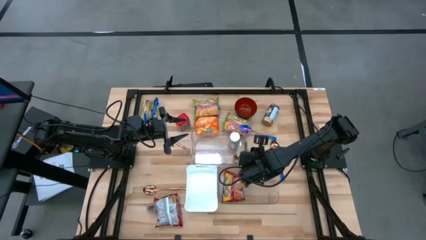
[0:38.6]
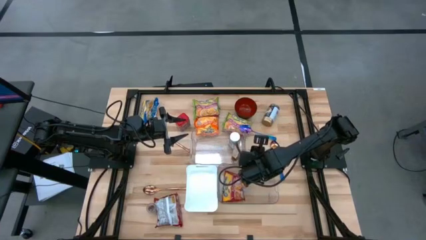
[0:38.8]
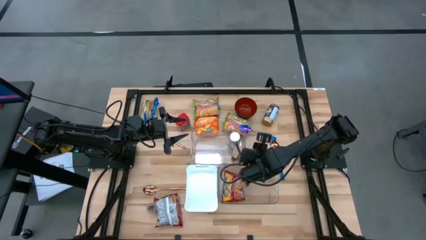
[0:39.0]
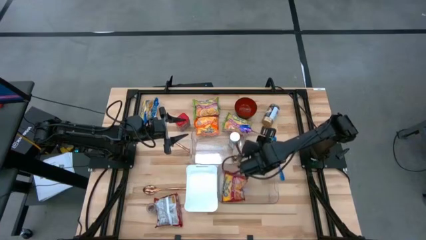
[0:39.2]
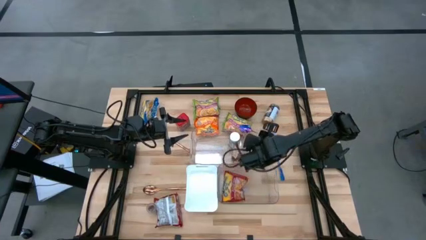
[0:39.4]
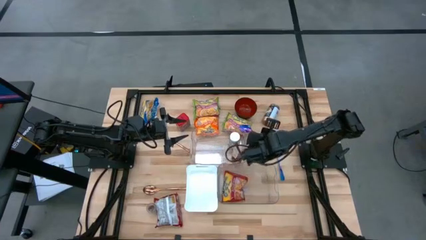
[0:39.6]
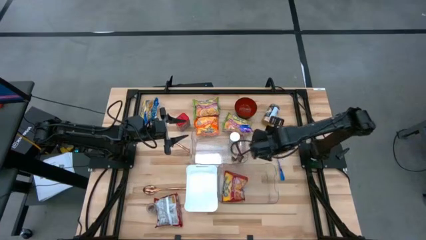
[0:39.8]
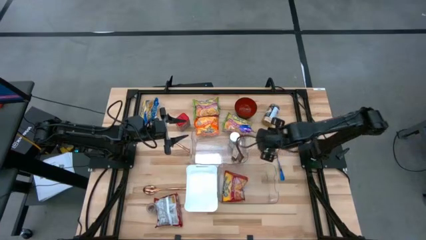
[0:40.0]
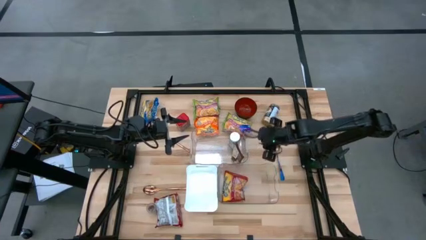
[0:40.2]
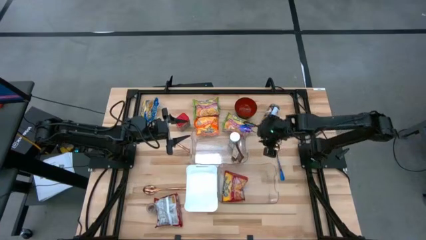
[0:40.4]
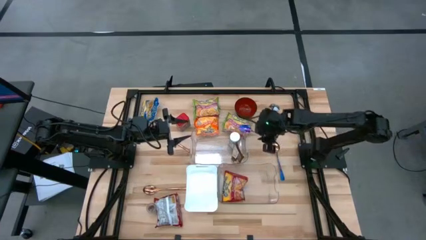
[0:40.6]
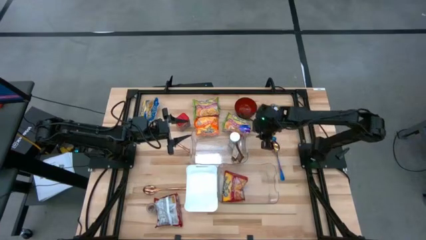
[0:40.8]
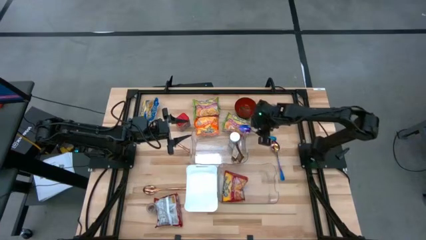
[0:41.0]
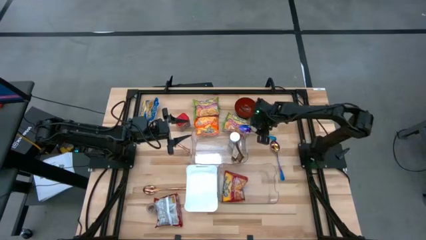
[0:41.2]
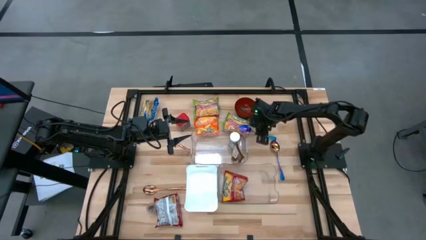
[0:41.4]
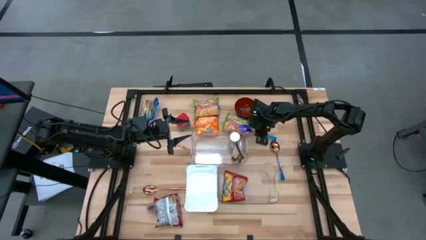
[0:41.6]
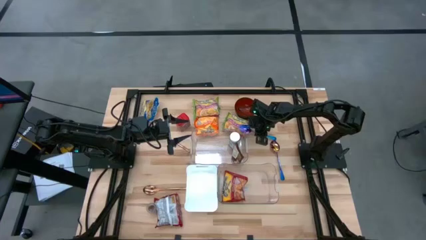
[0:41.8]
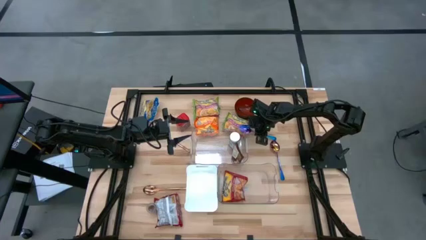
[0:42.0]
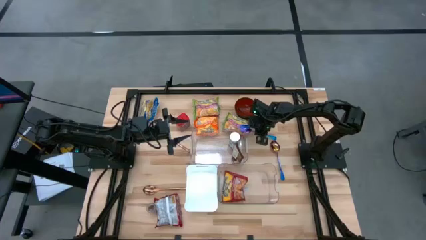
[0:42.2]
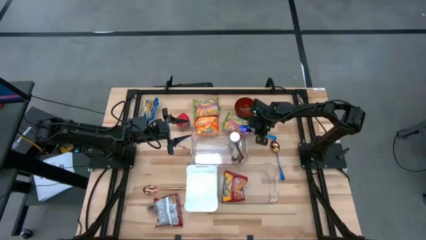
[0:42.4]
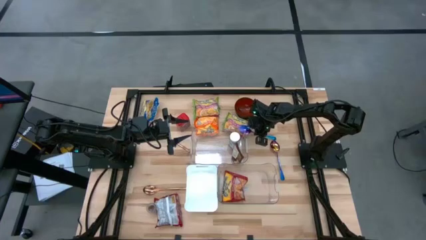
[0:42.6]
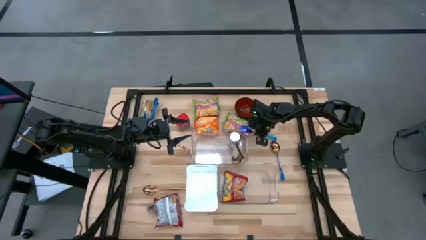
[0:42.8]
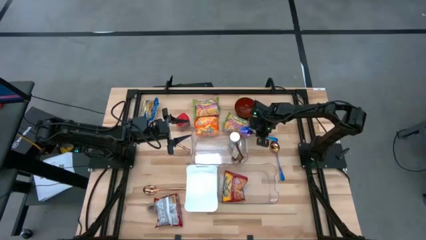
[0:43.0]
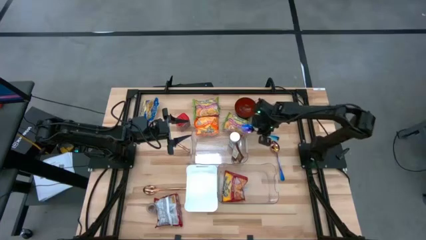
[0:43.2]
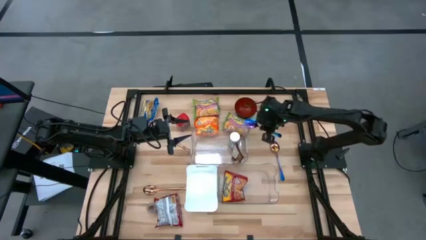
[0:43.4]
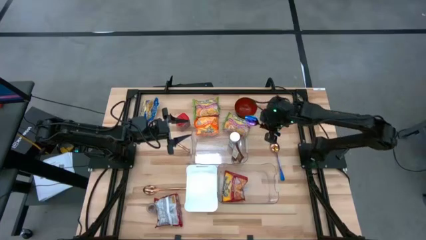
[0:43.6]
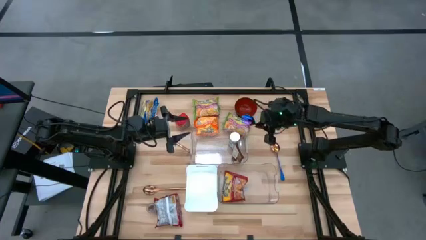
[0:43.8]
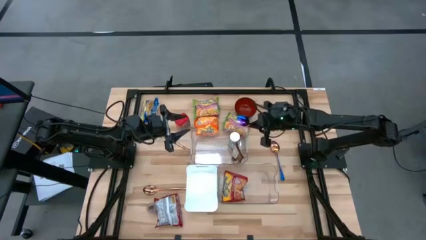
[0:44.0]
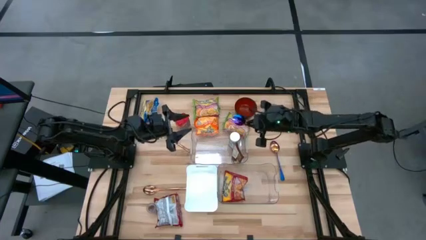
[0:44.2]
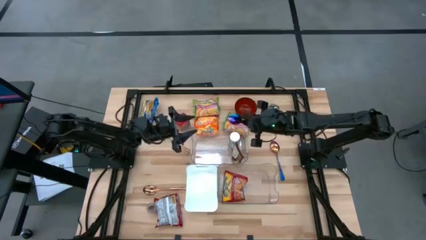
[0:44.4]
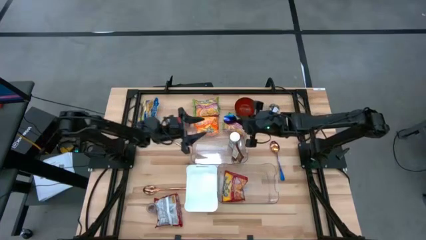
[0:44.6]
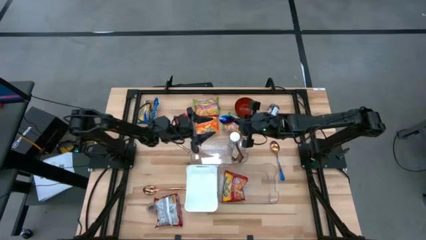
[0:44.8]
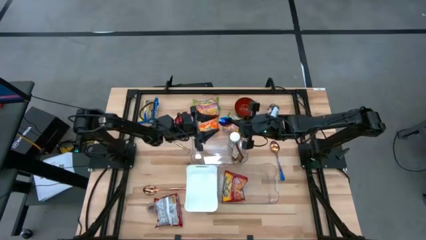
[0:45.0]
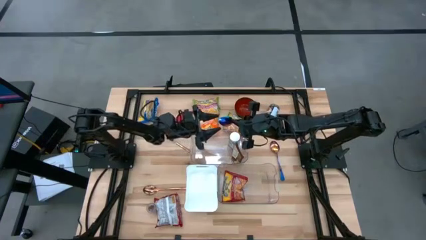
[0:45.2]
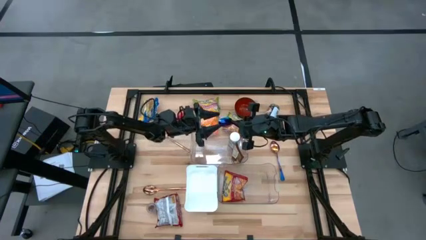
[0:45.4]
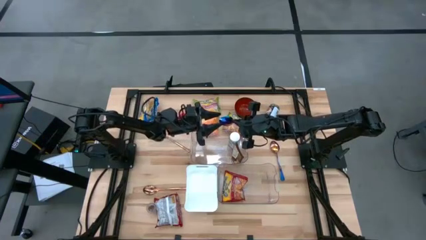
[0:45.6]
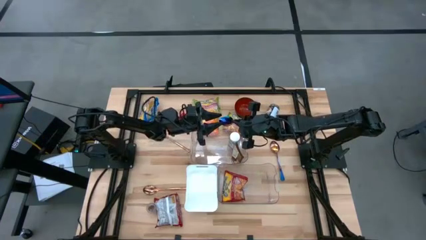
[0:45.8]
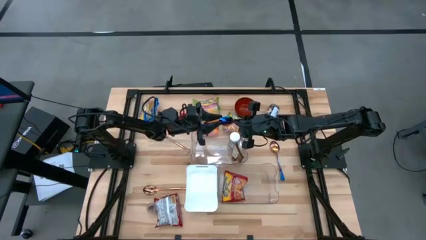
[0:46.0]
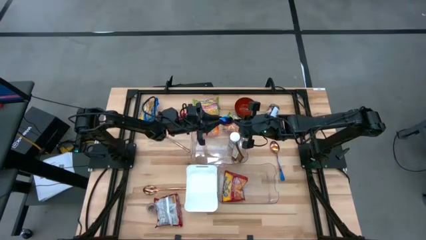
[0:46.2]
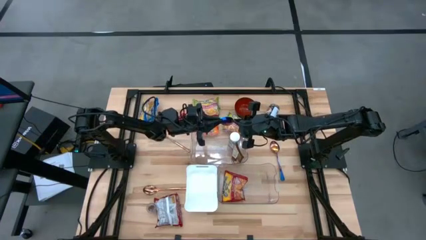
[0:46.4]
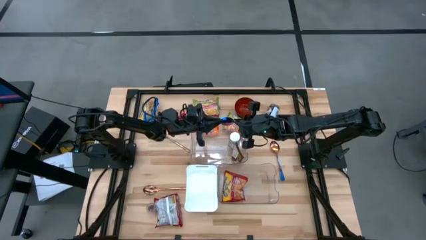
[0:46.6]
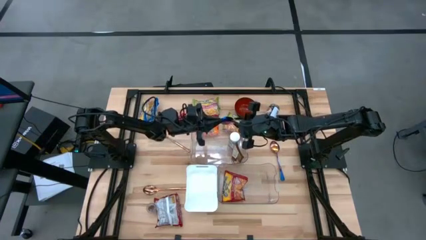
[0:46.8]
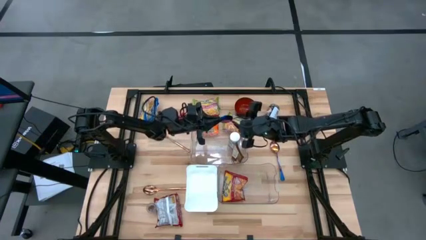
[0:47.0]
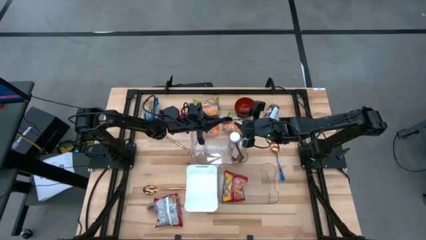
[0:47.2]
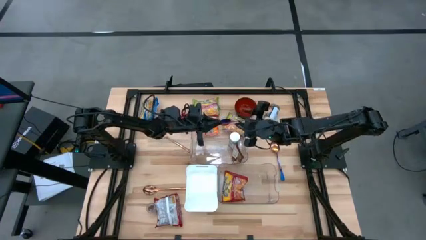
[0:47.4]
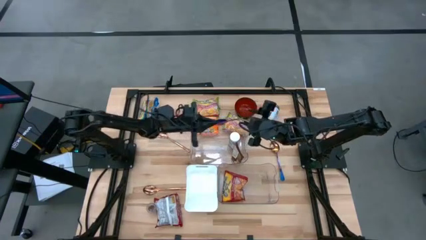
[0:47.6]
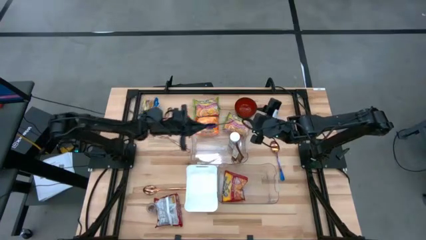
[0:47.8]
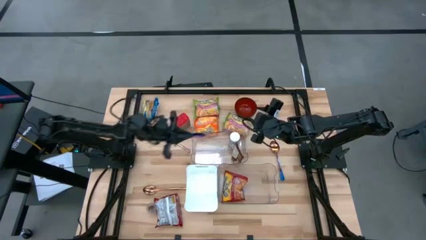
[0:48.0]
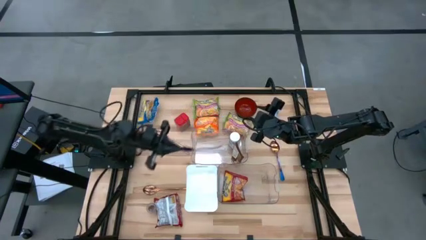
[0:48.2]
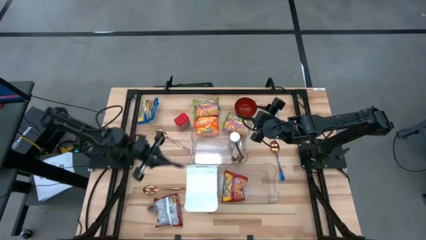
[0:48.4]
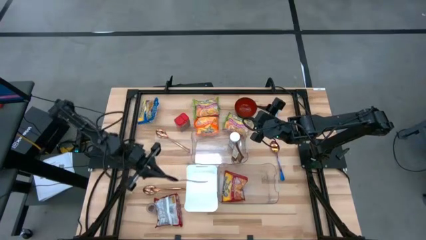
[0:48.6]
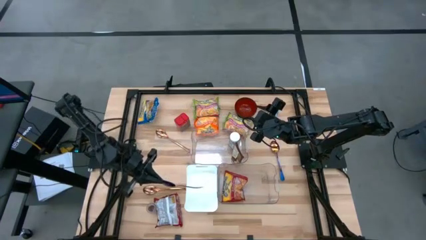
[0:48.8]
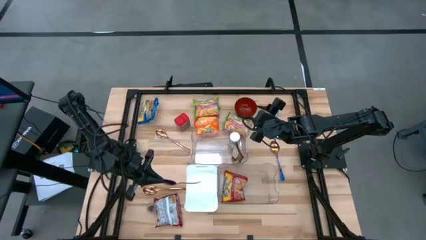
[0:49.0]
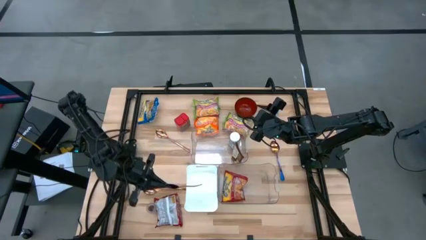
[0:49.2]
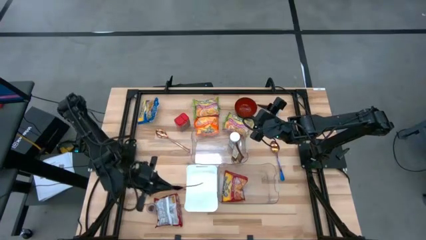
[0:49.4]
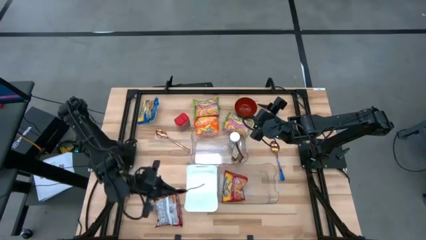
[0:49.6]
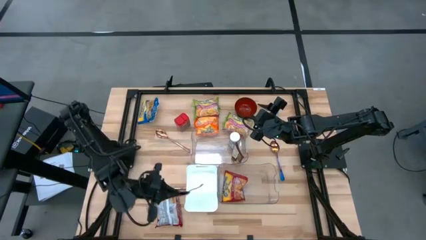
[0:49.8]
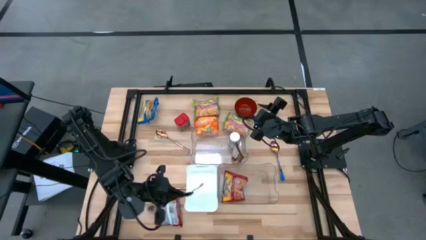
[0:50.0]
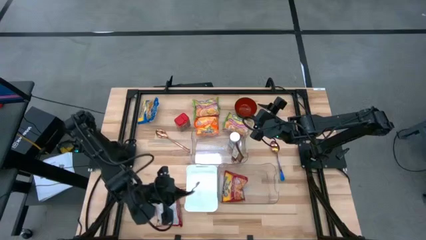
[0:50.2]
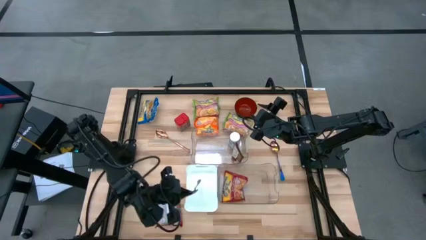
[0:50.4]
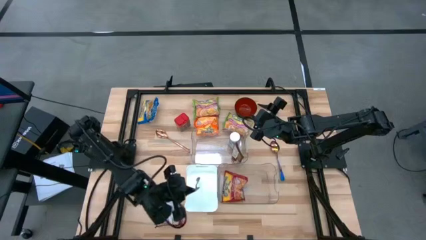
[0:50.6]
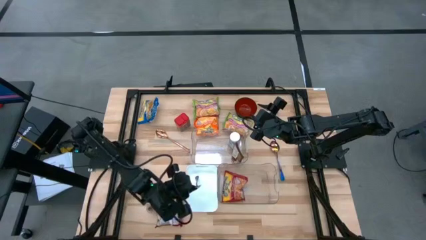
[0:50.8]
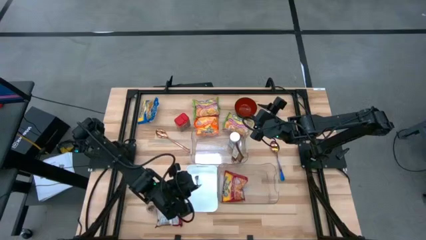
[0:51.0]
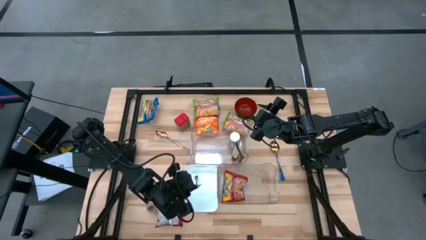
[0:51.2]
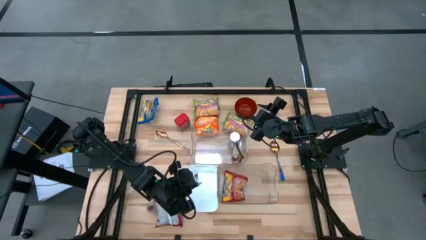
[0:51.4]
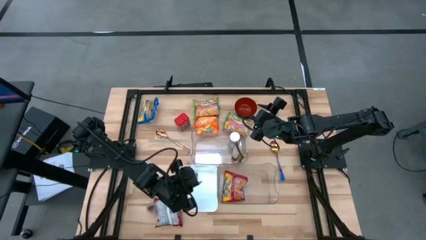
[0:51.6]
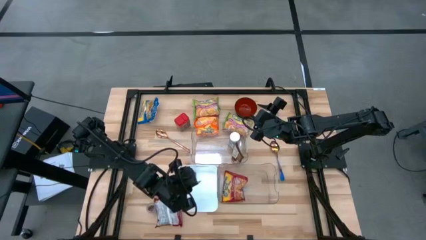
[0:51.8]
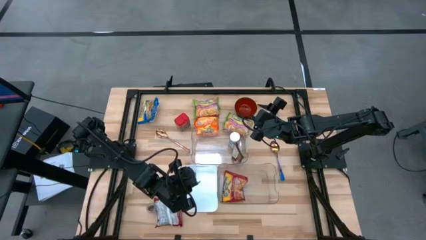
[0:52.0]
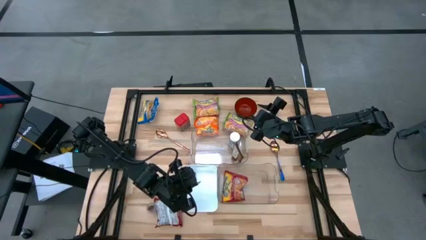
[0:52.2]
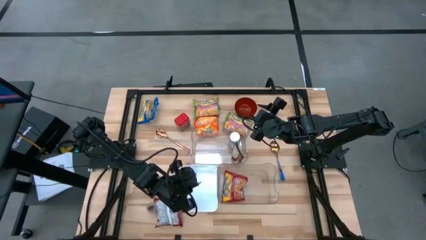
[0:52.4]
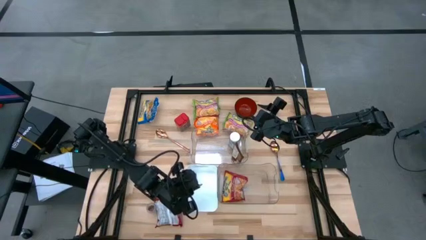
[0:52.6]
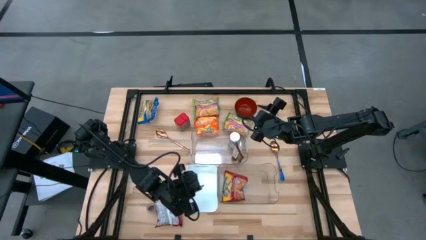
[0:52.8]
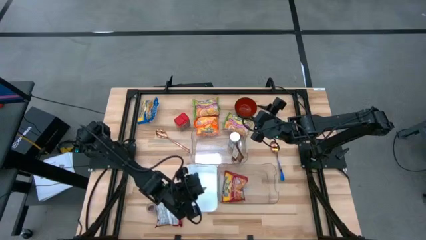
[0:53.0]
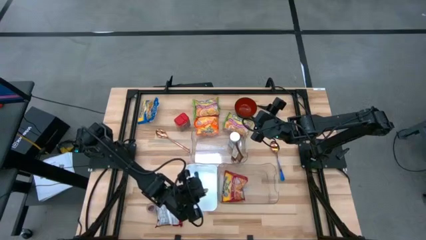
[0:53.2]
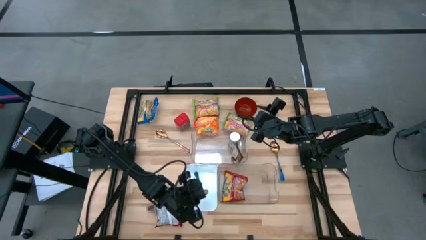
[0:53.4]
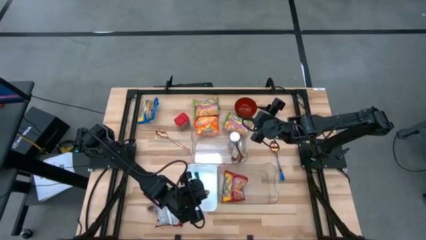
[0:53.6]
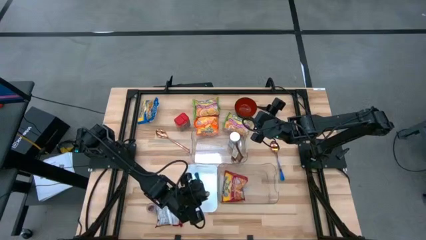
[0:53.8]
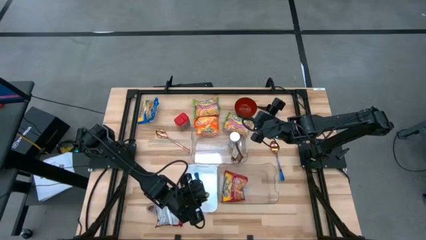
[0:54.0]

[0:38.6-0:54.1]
Task: Pick & Place Food Item
Put the top purple spoon into the white bin
